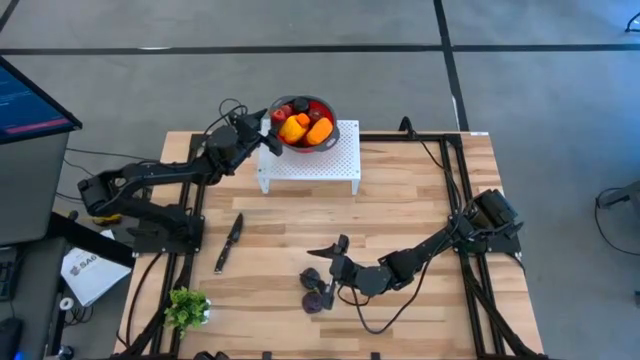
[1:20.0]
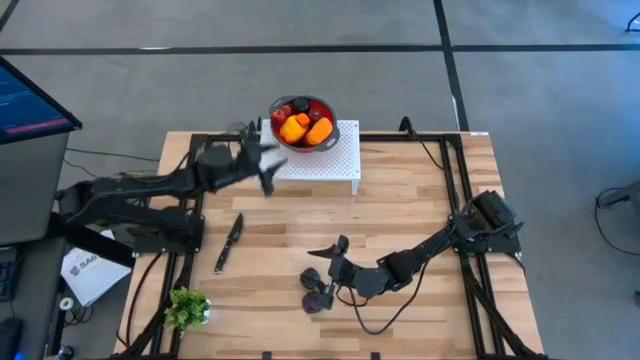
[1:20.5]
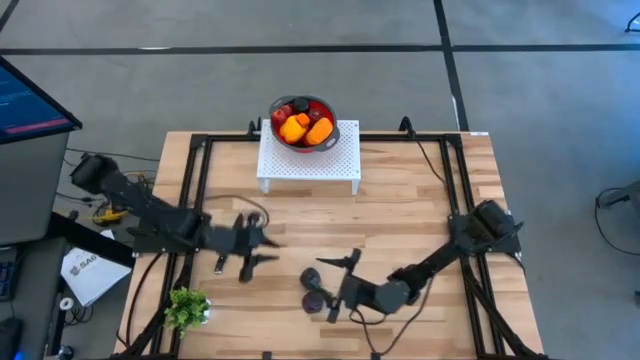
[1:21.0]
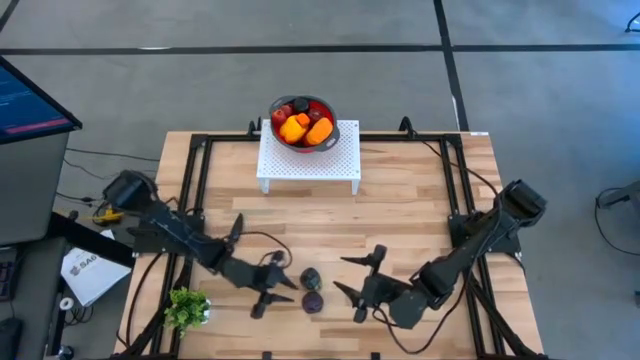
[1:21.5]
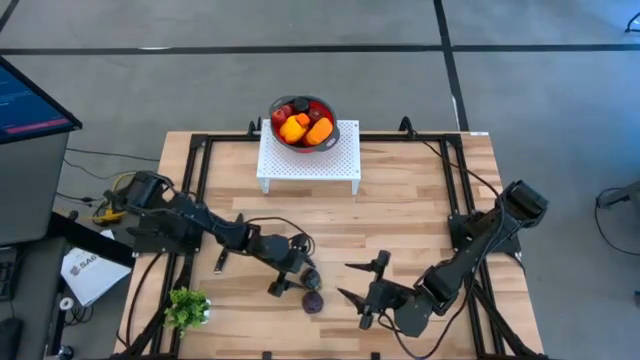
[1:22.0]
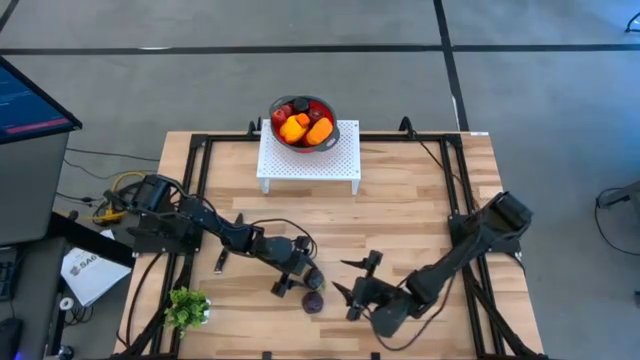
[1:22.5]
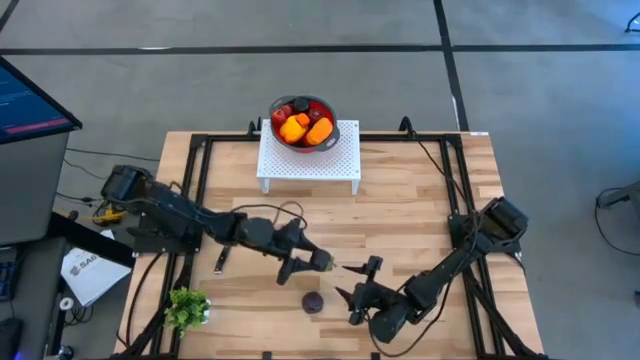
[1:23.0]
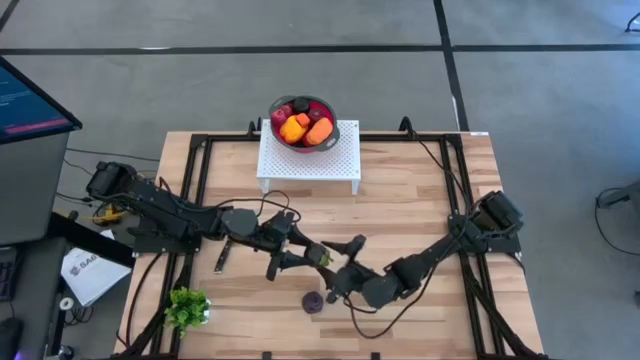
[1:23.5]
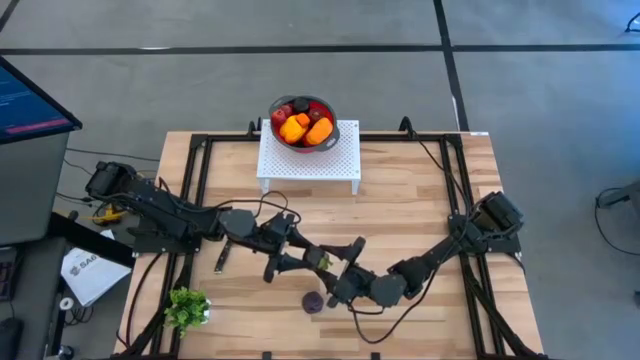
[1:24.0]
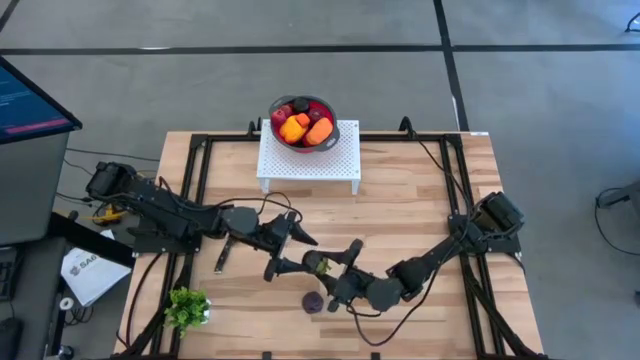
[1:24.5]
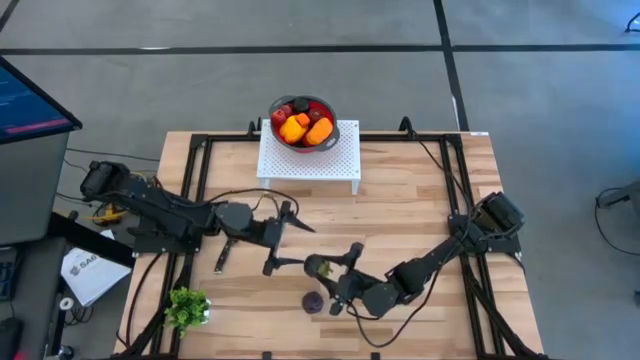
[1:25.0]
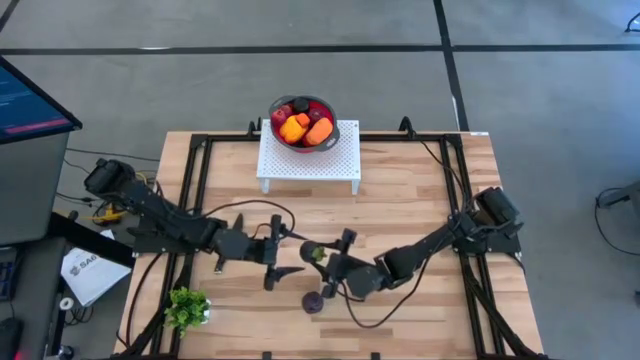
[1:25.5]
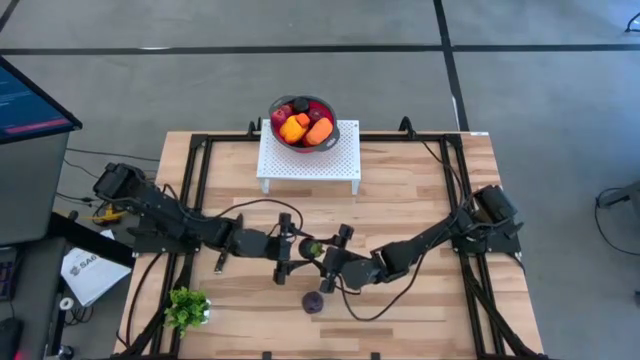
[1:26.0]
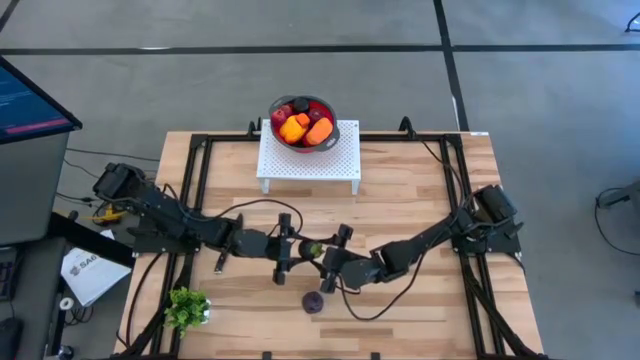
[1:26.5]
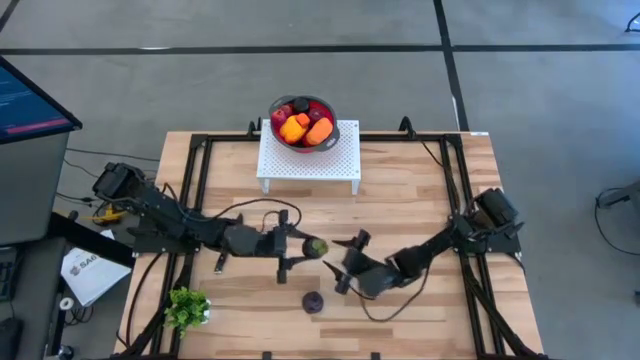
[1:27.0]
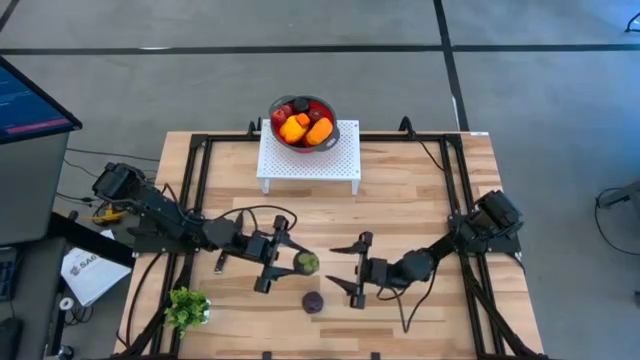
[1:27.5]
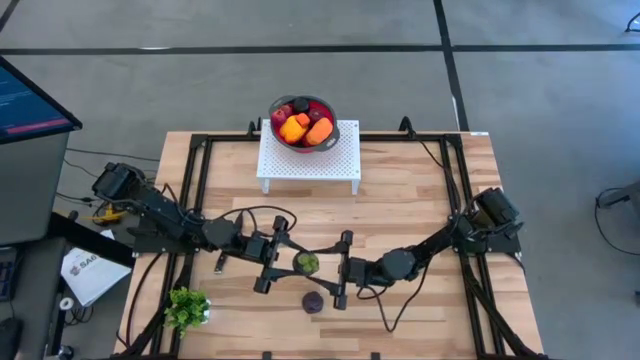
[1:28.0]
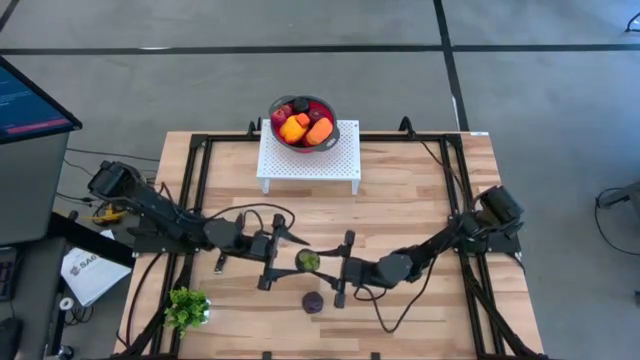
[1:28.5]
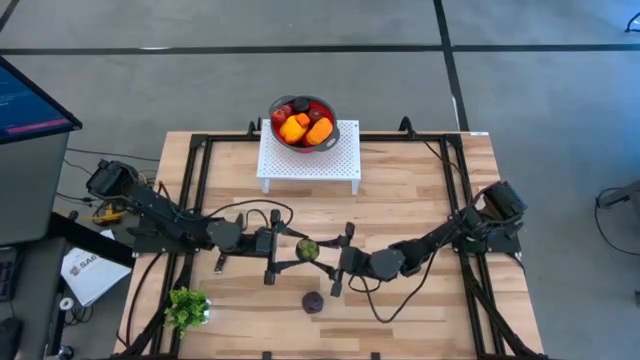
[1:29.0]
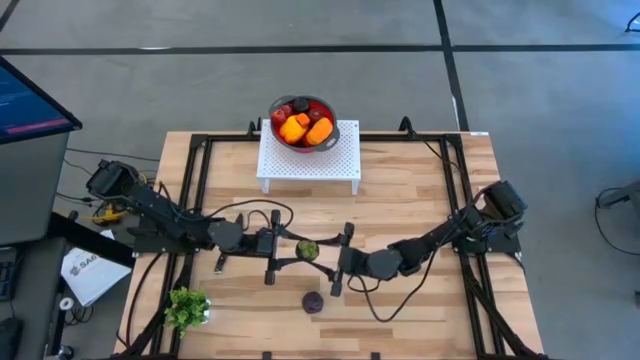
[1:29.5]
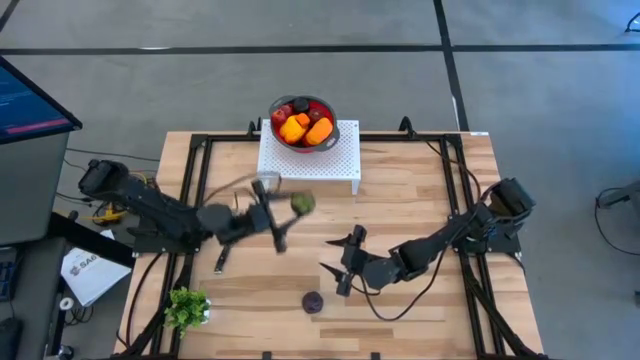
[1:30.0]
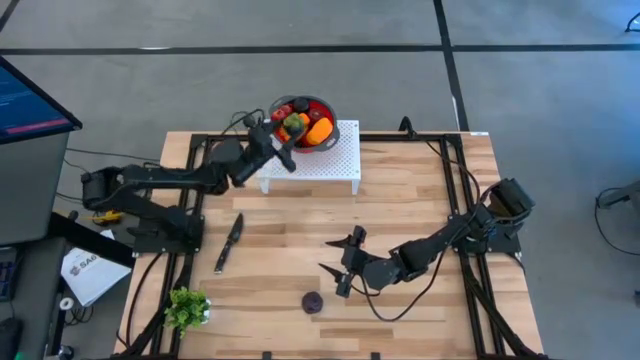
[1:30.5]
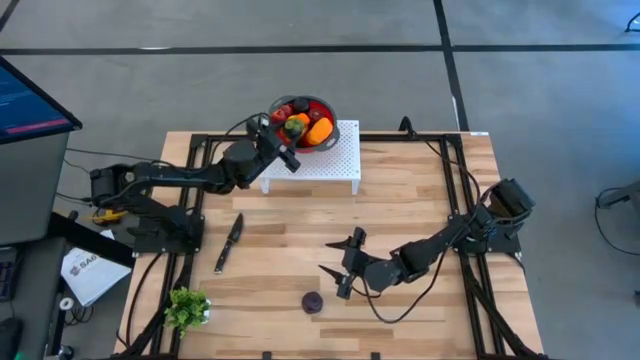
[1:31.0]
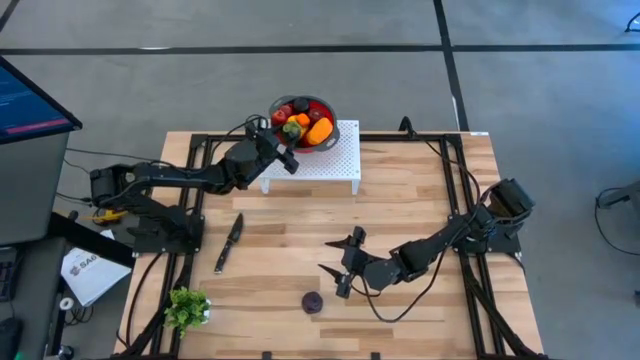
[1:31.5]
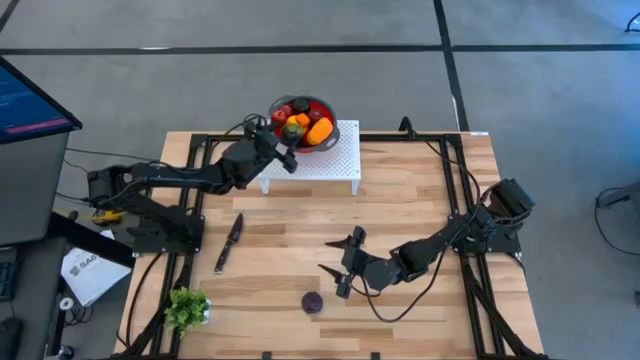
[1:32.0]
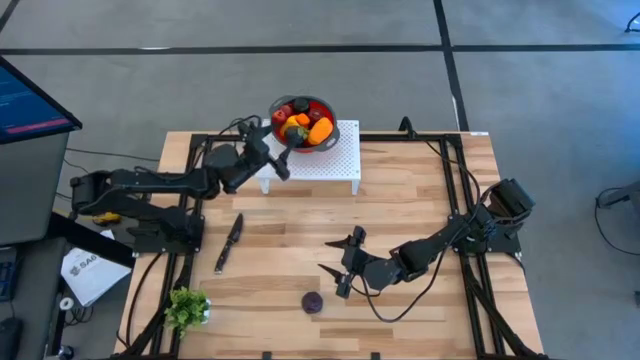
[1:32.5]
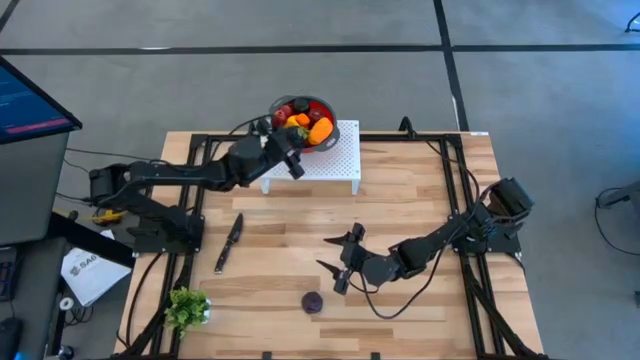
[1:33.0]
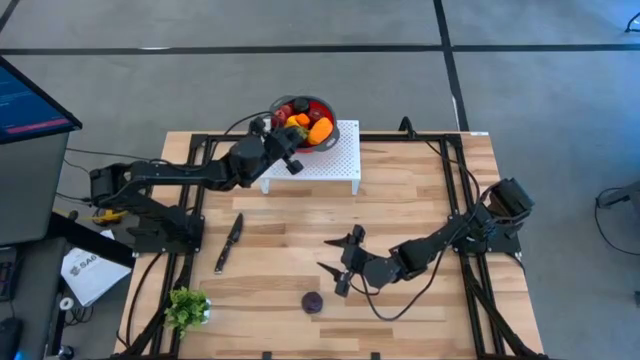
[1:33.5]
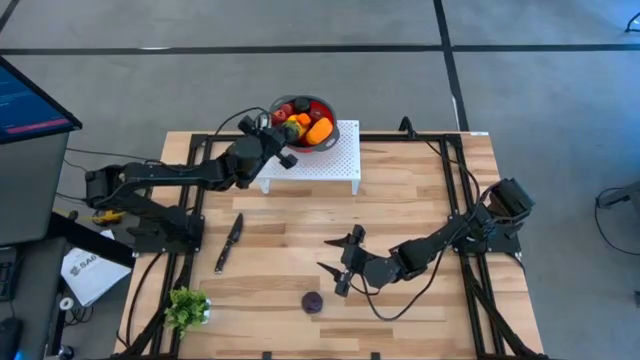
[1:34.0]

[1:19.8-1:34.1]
Task: Pick & Place Fruit
Put the top purple plum into the red strainer bowl on the shelf

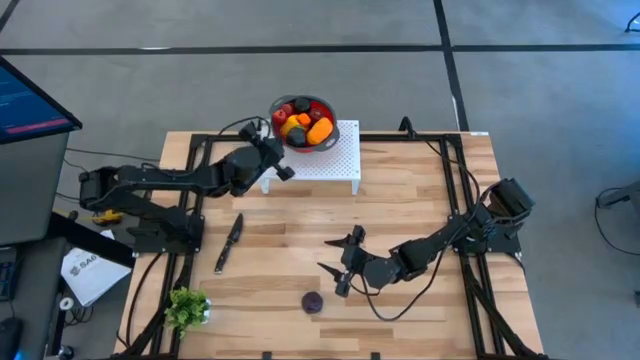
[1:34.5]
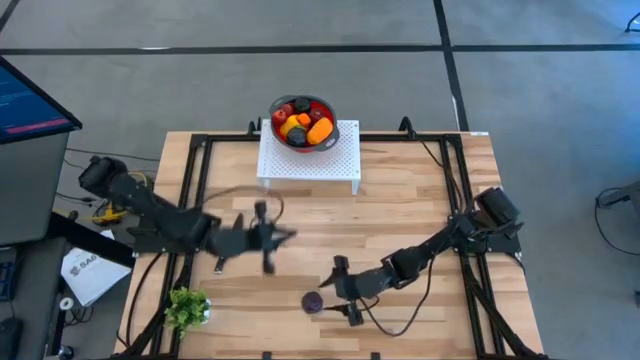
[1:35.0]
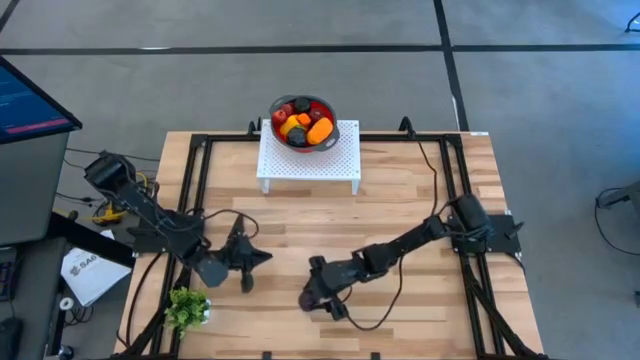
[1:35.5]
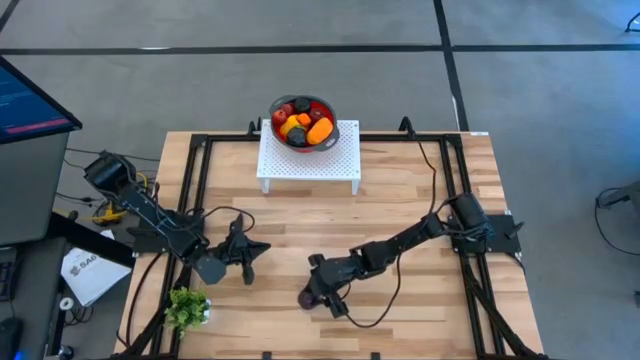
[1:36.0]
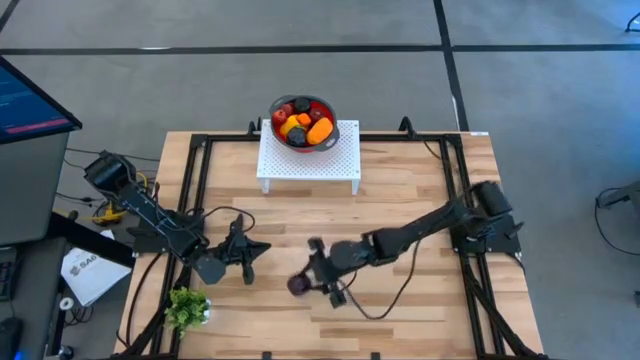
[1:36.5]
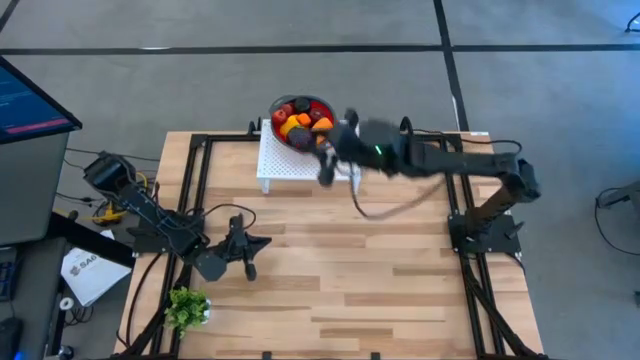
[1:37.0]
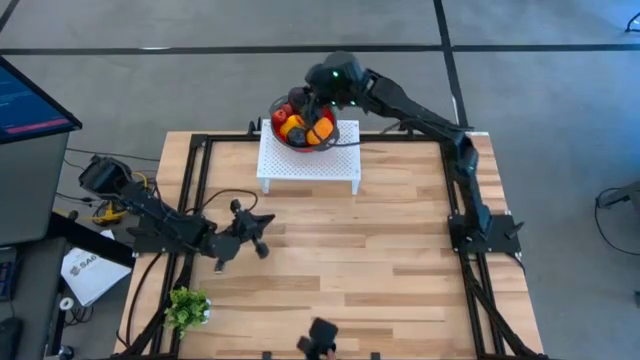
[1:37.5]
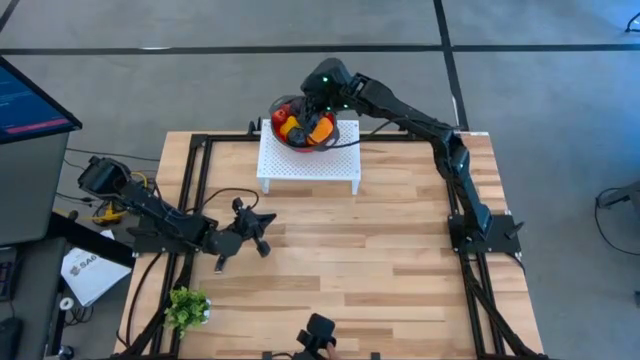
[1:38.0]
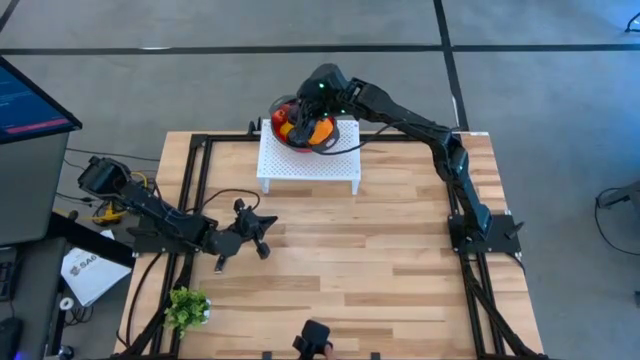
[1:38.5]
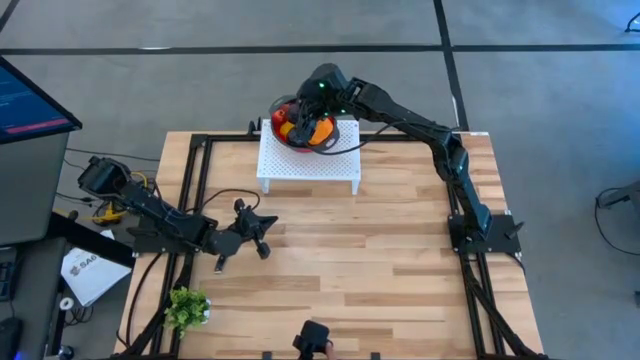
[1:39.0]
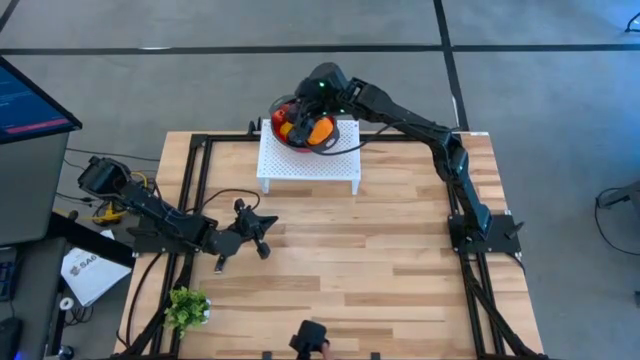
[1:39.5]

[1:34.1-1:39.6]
Put the purple plum into the red strainer bowl on the shelf
